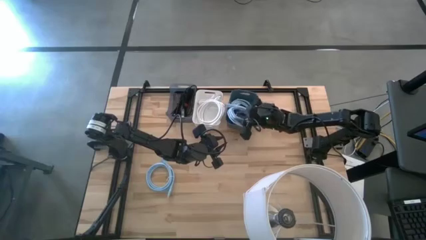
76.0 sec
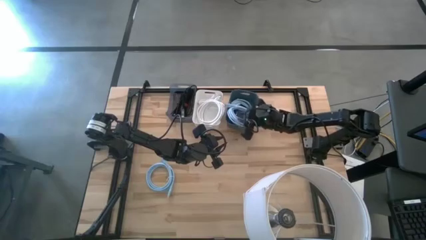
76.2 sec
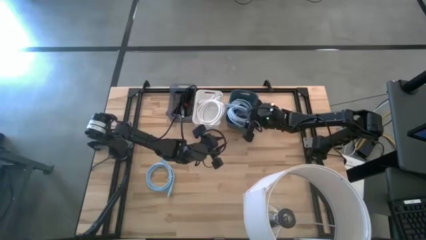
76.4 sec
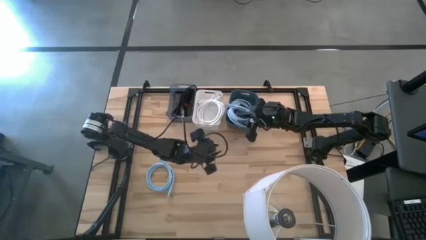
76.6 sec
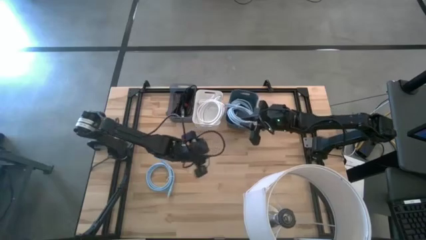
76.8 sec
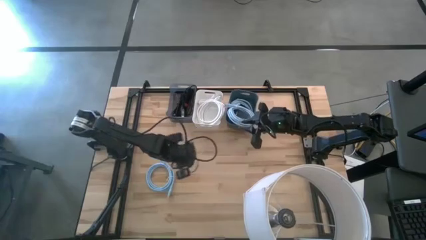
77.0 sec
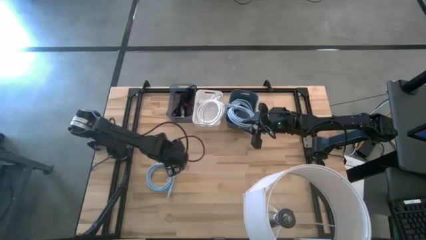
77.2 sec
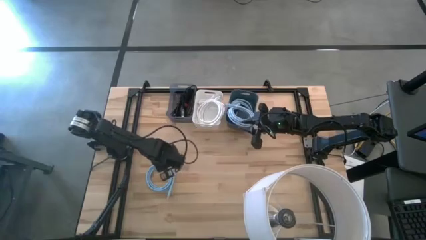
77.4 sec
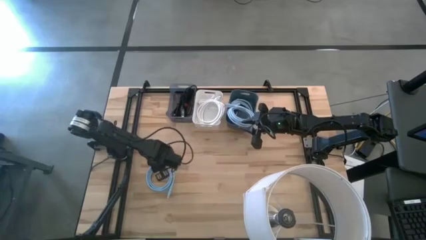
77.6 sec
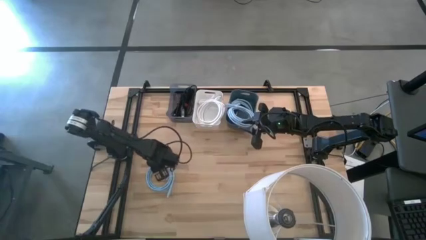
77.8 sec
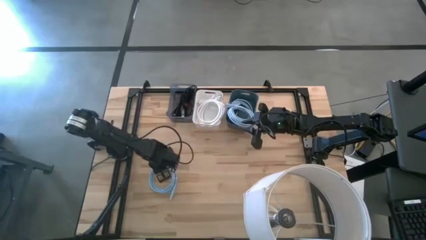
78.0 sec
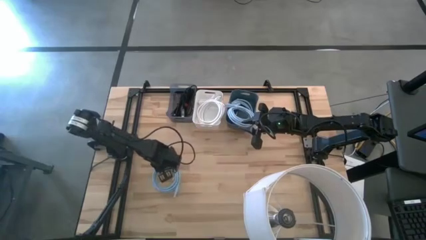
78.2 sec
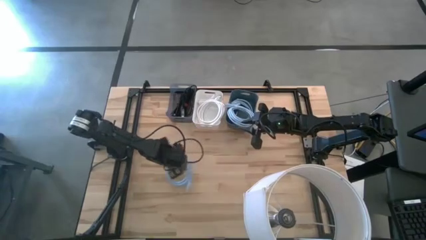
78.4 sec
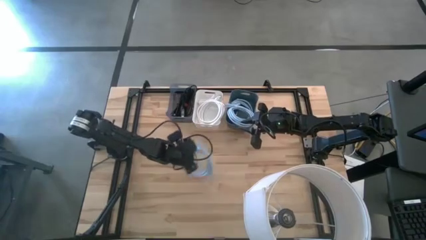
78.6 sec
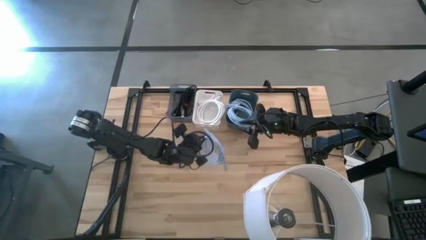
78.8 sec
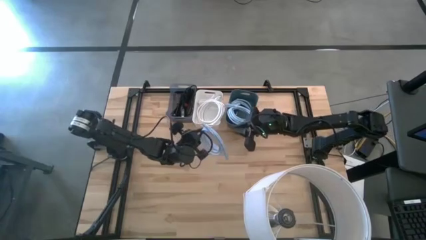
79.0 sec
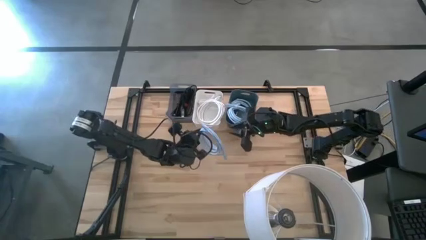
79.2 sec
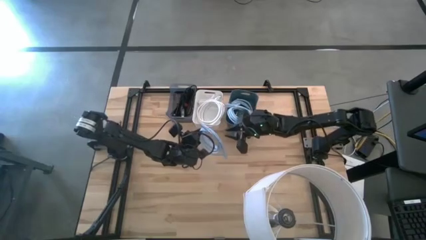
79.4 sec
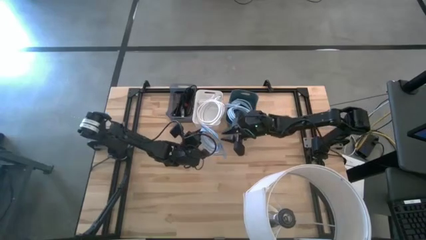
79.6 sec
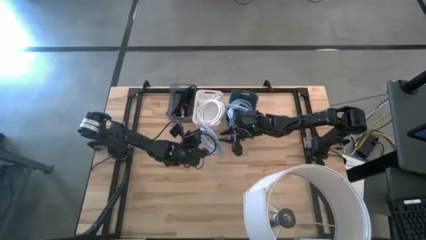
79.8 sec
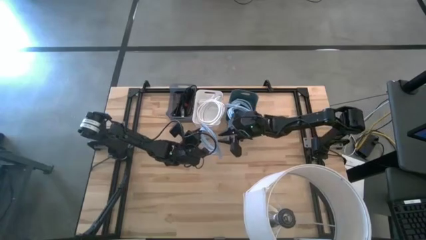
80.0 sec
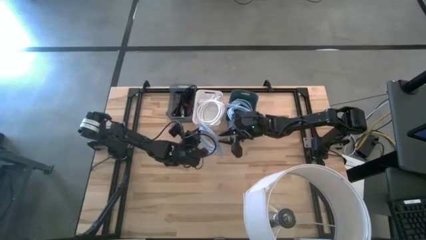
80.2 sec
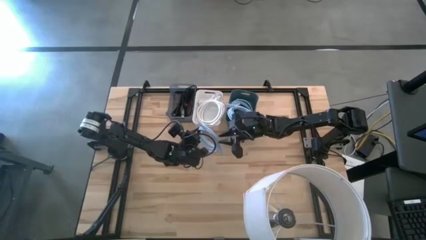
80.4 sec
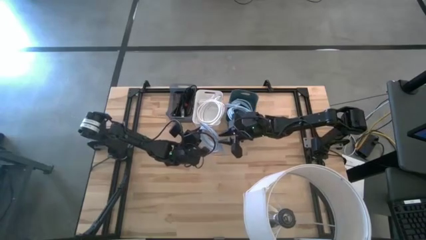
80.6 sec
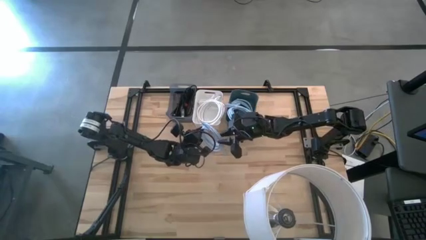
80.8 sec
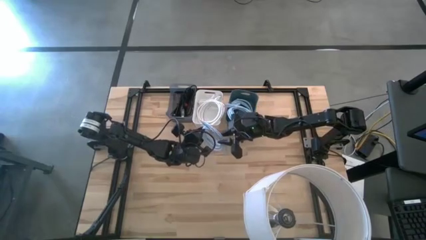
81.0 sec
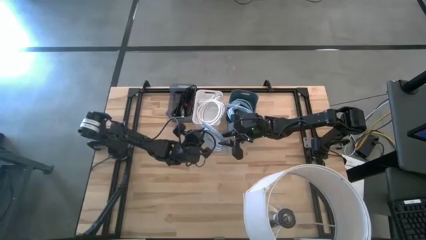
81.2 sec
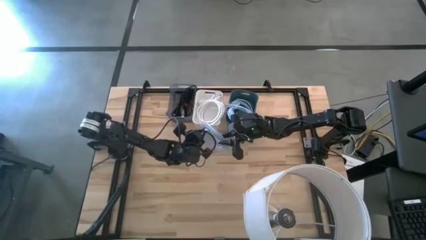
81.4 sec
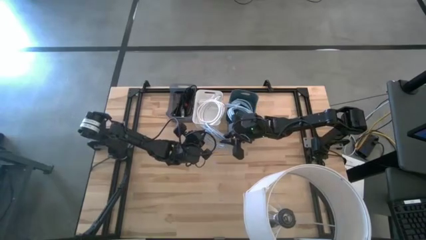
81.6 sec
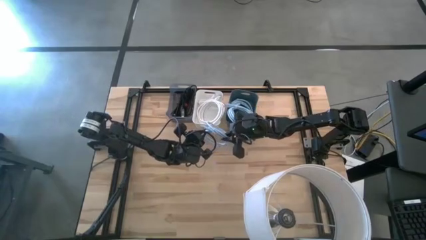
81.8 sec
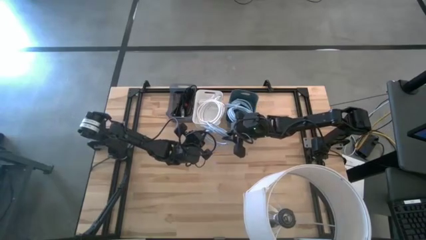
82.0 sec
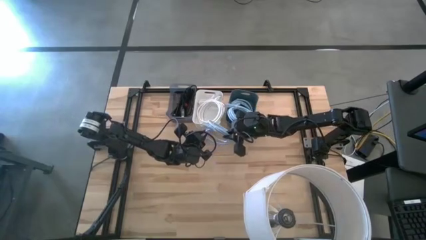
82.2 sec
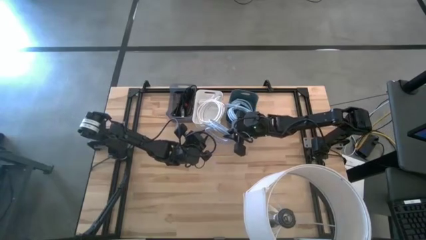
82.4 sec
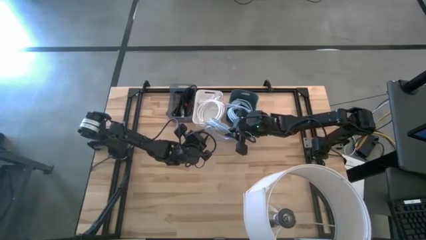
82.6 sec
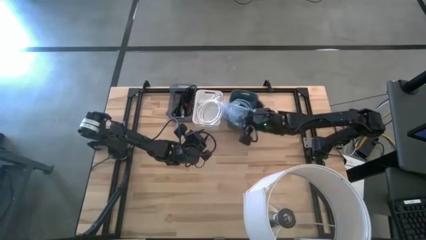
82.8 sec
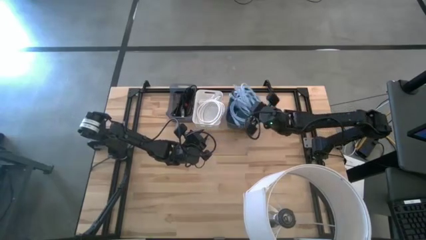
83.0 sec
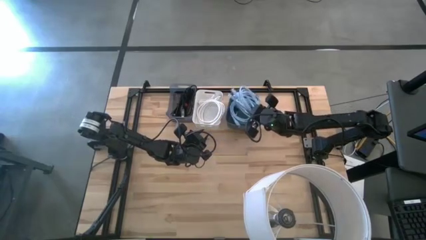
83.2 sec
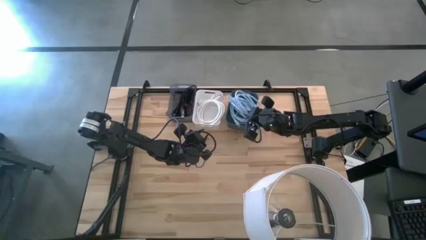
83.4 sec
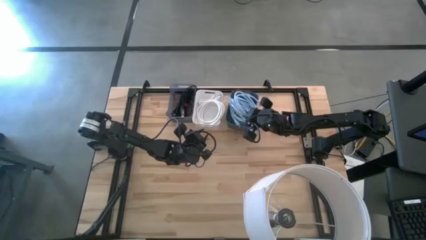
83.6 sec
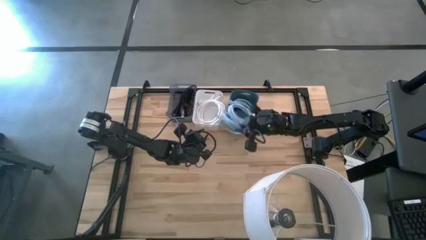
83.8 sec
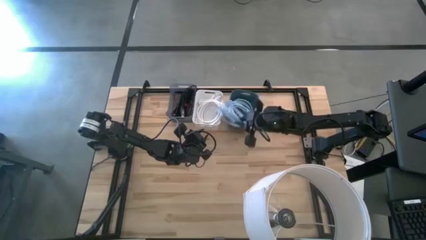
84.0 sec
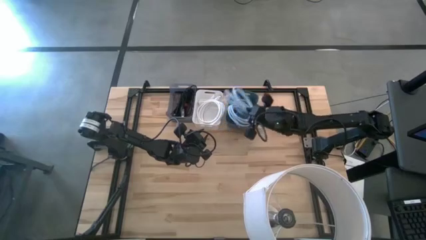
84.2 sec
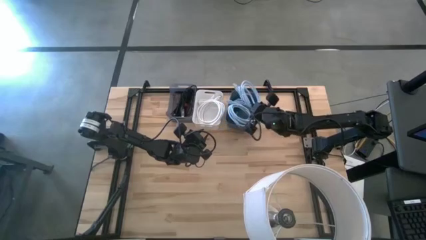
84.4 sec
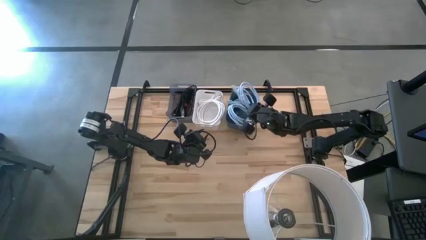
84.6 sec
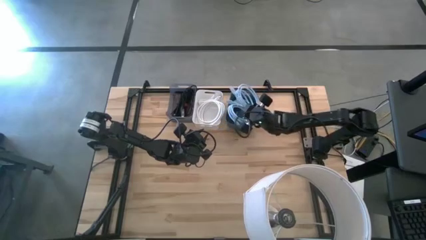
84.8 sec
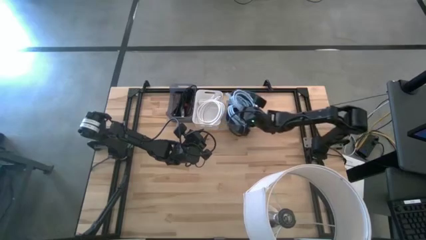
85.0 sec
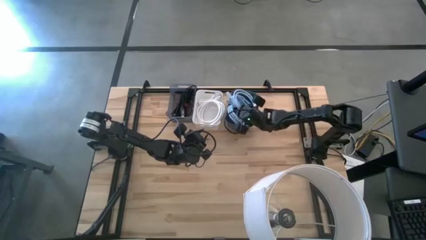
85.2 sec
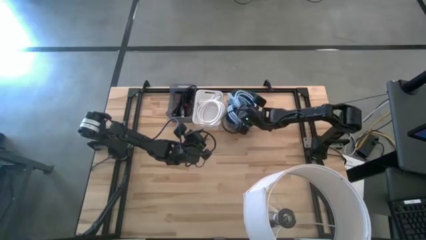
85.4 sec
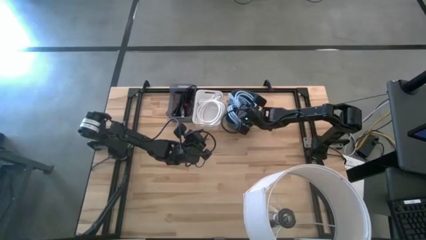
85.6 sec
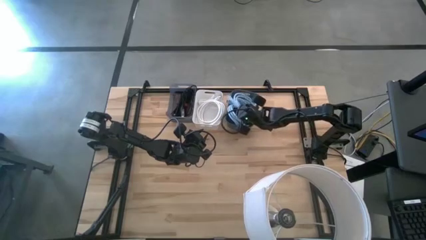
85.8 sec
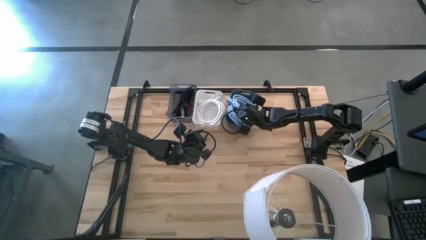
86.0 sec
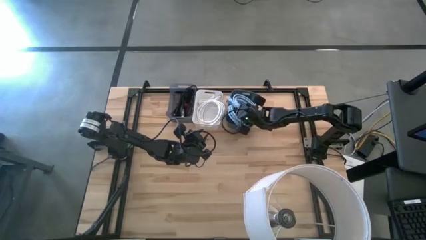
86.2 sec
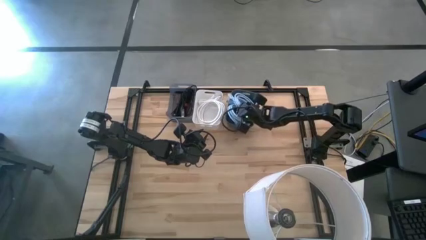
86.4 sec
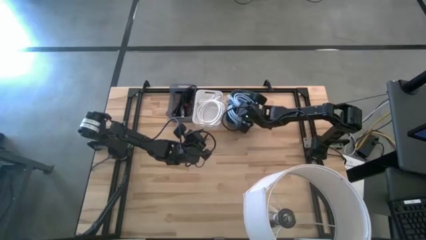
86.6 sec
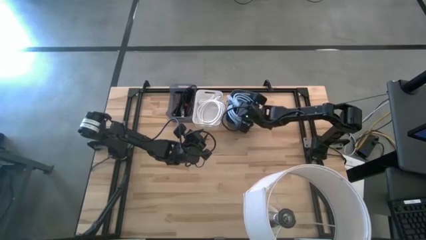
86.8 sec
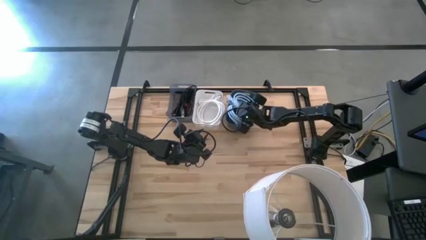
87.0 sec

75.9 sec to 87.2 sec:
Task: Pick & Place USB Port
Put the blue HDMI cable into the blue bin

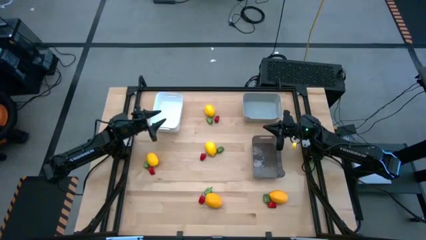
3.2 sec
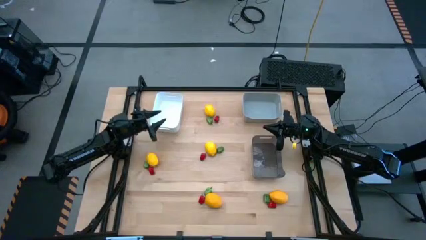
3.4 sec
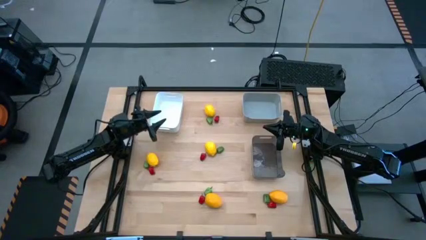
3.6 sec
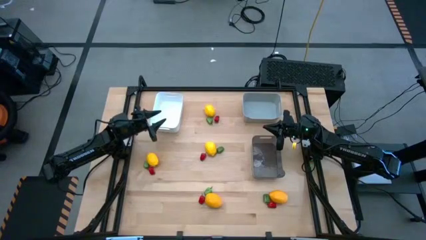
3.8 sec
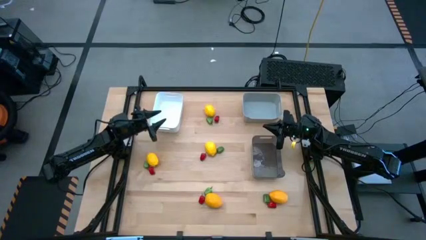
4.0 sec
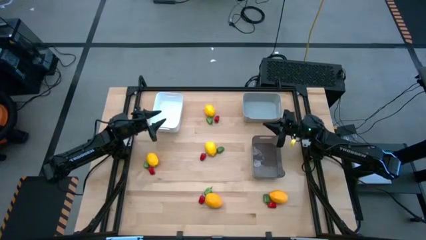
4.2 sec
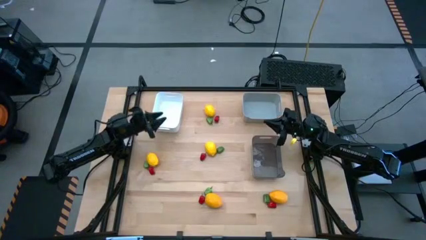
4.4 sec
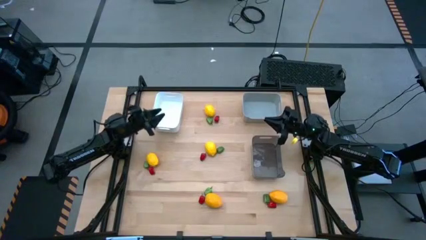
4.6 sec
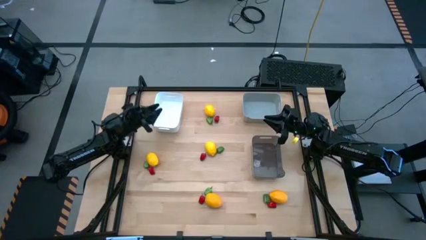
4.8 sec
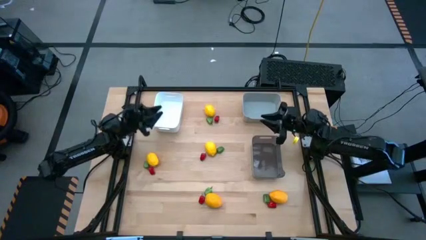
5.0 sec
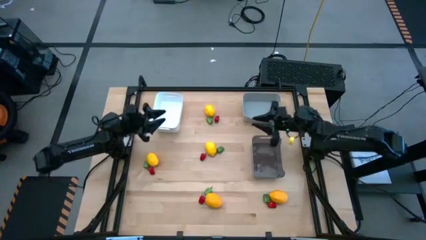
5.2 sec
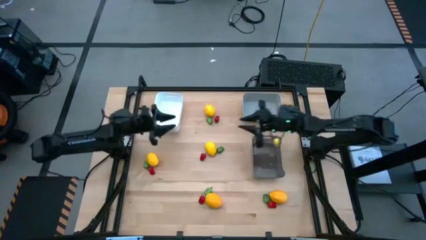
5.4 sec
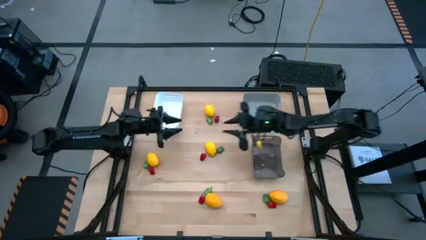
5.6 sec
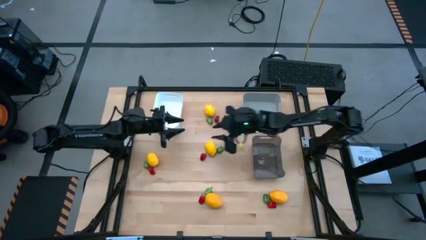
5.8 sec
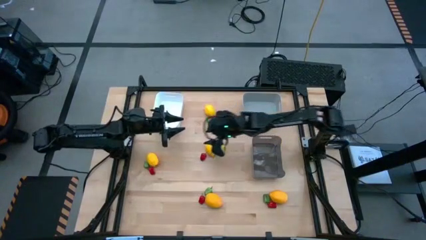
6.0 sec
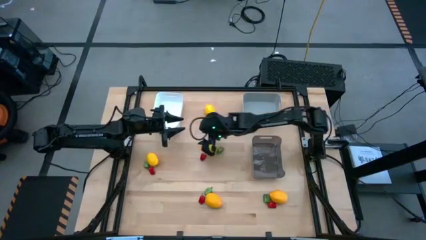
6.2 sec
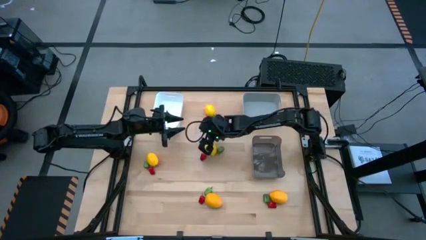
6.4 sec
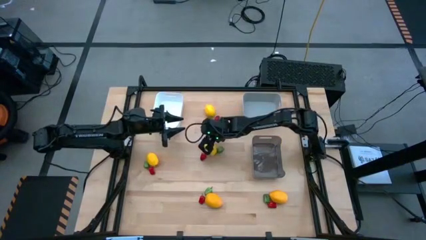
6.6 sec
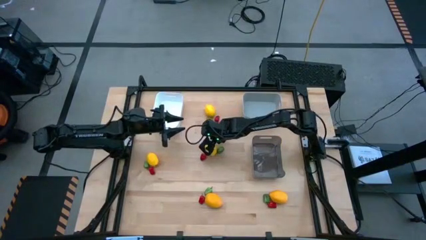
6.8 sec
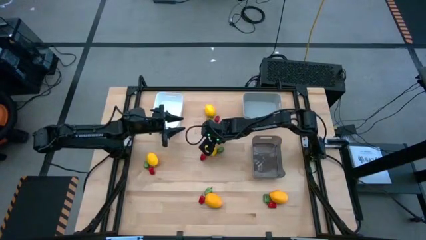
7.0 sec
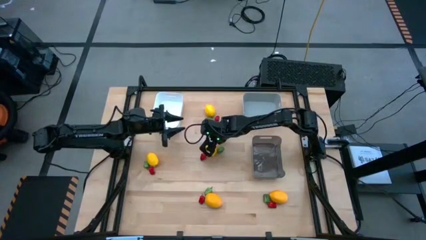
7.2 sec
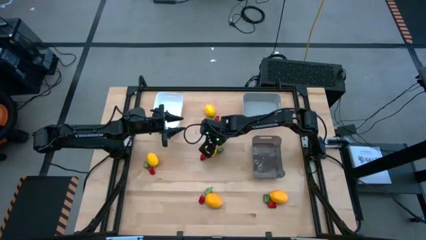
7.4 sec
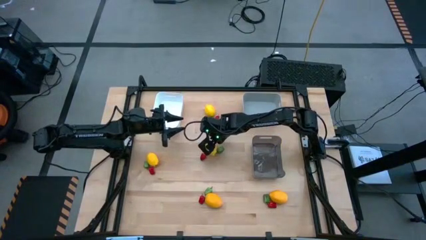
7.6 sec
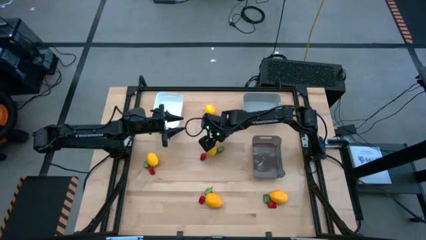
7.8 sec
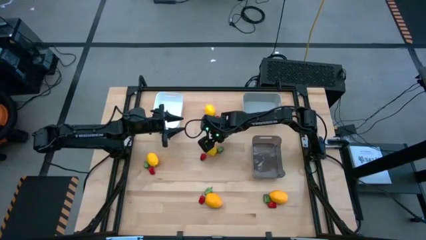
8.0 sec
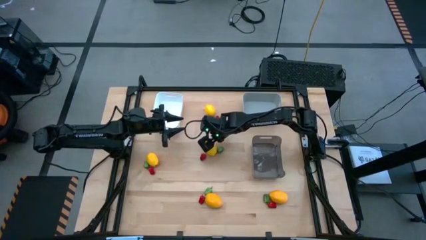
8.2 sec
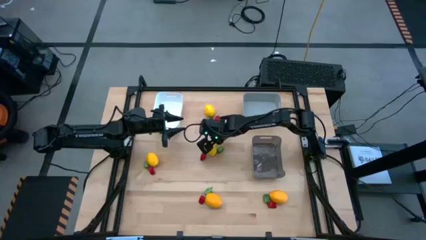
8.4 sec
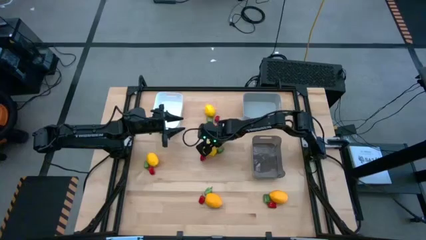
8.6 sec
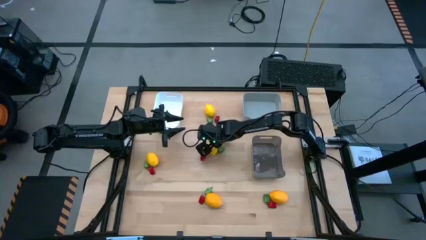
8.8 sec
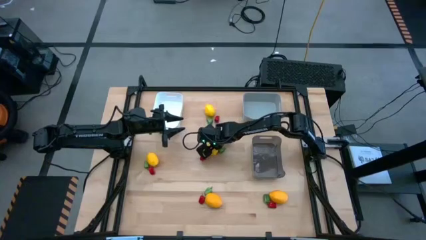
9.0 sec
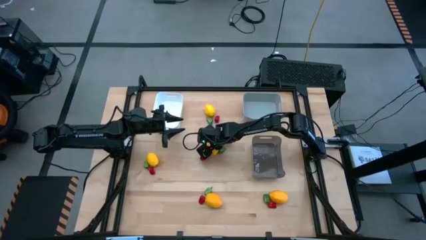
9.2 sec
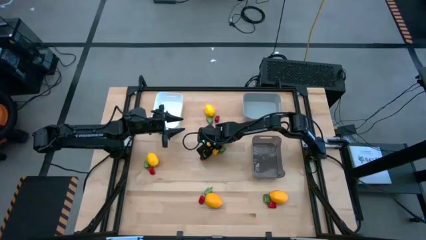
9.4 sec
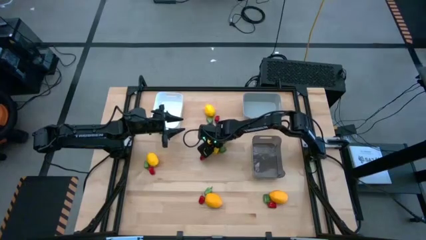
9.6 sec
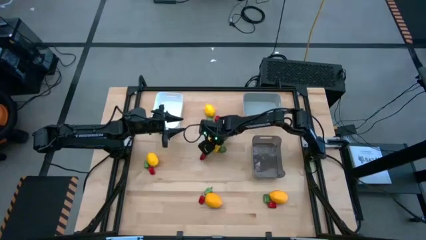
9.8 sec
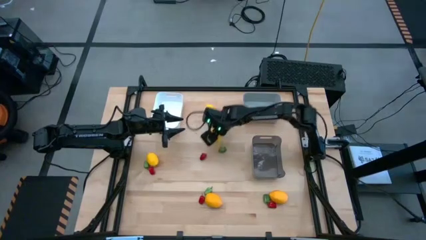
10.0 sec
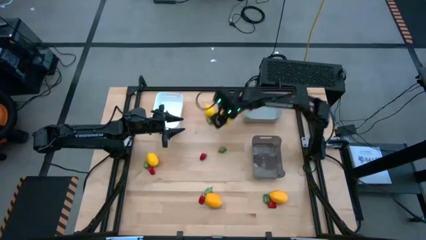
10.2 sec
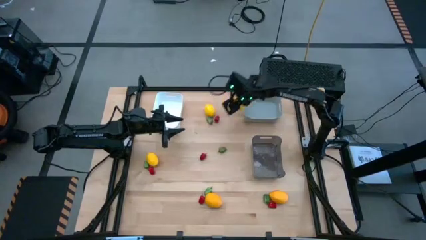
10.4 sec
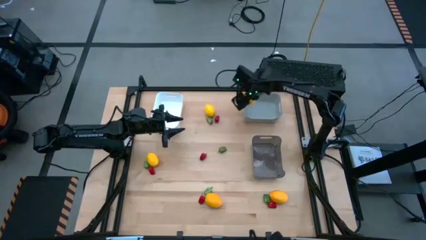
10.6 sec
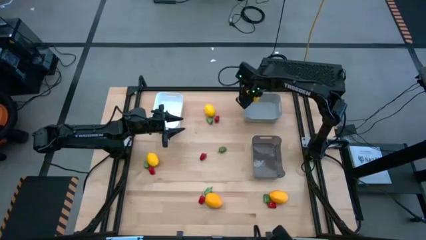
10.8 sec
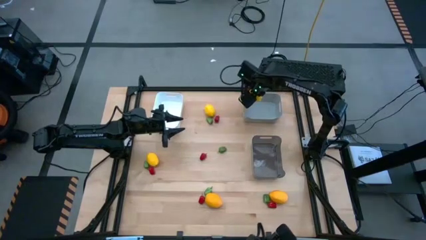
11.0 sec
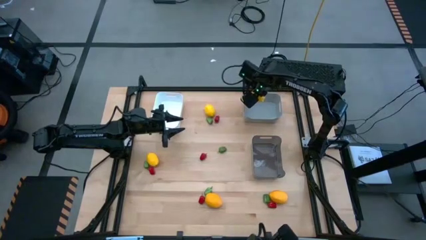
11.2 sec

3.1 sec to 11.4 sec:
Task: Sort produce into baskets
Put the yellow lemon into the gray bin
